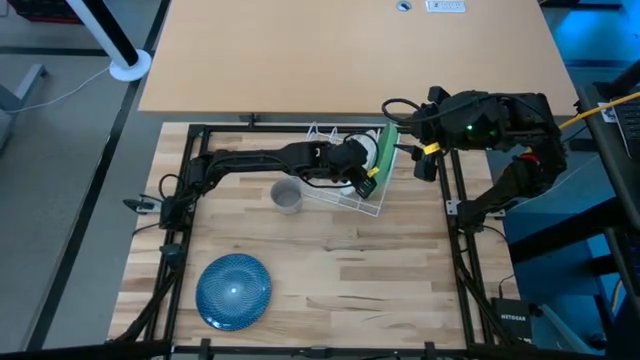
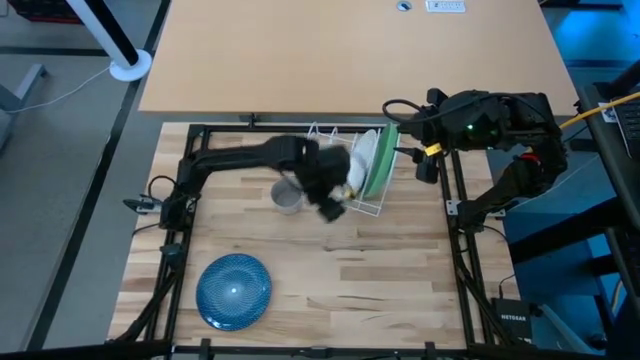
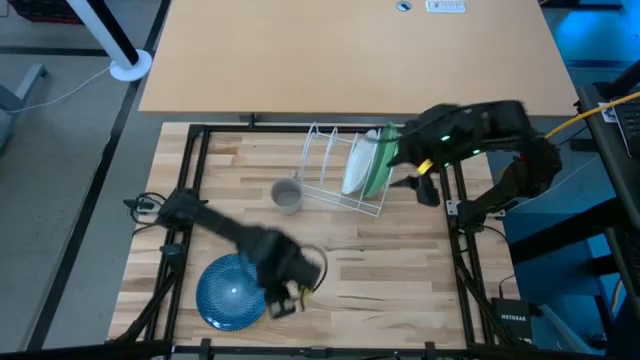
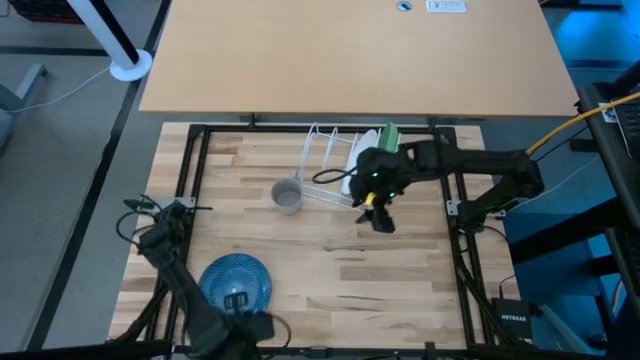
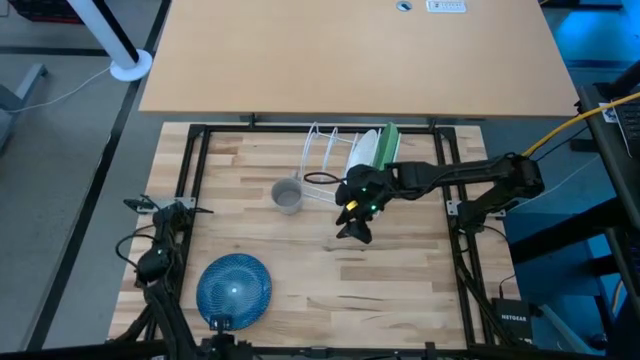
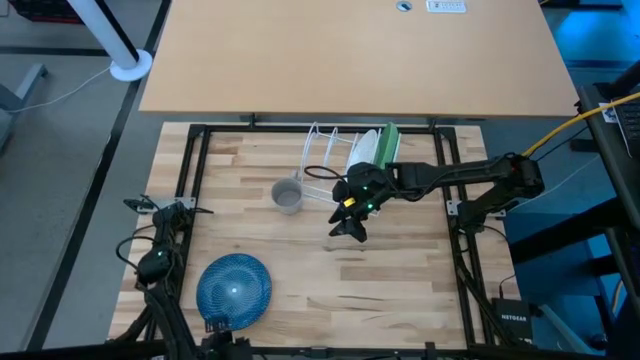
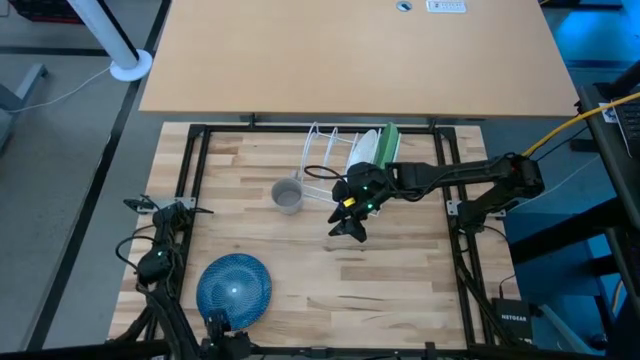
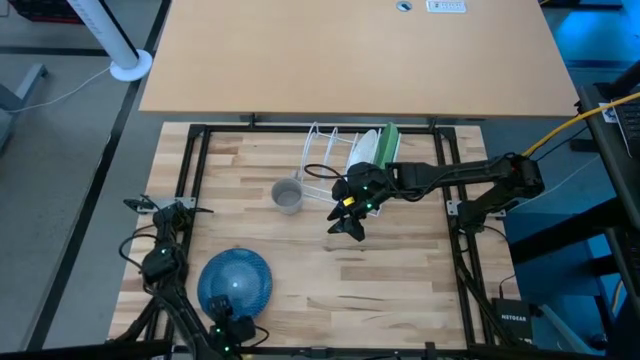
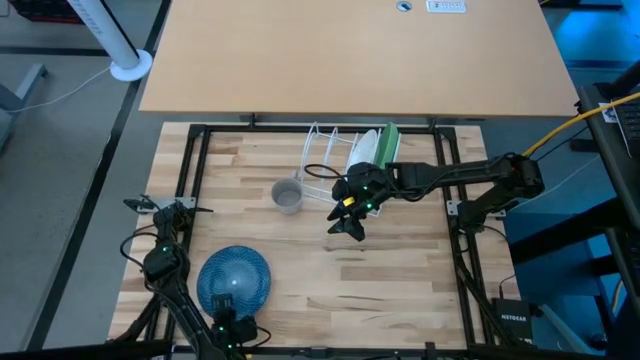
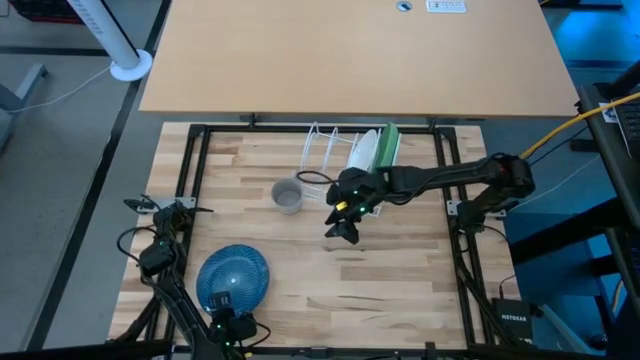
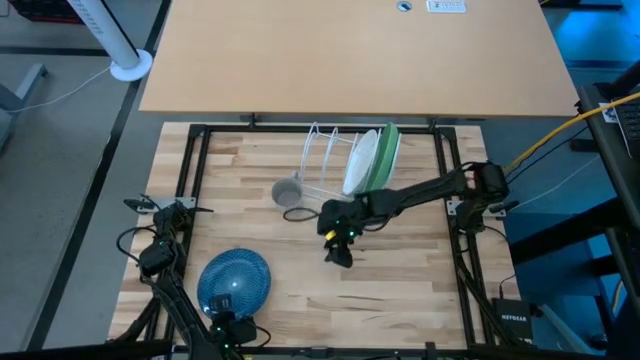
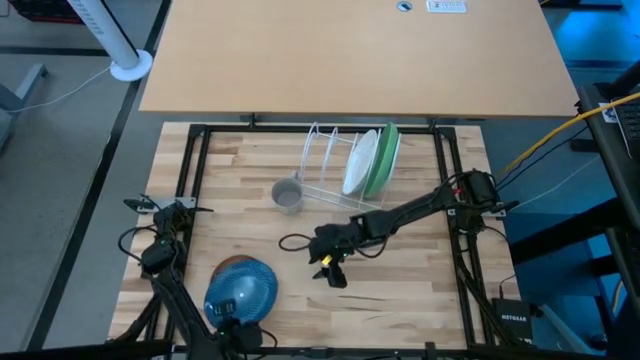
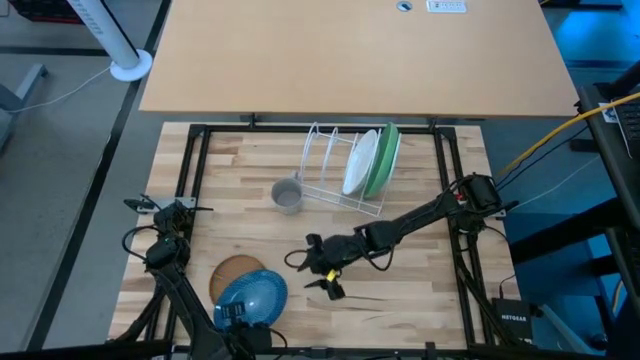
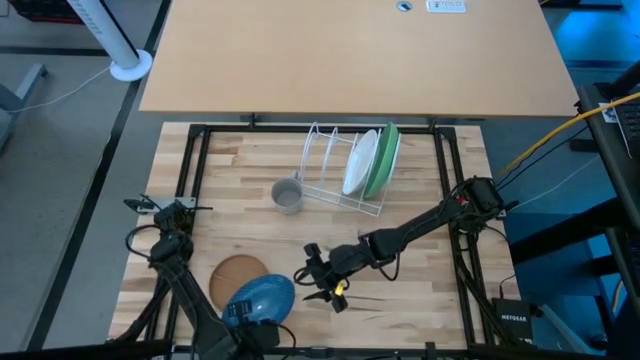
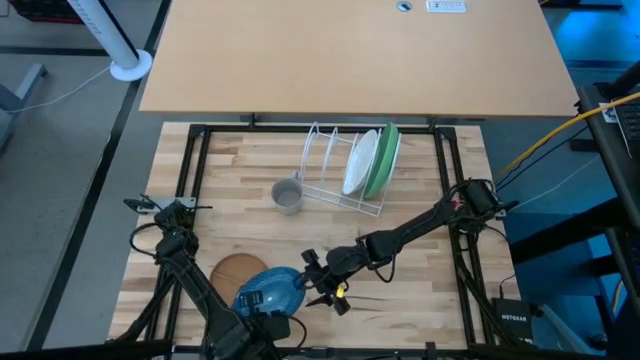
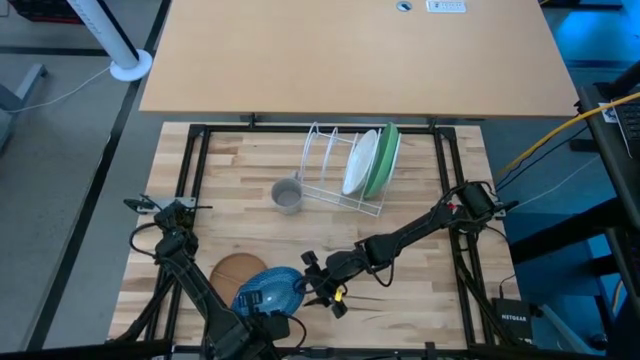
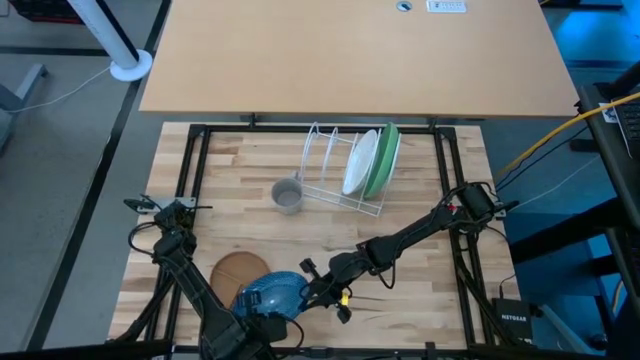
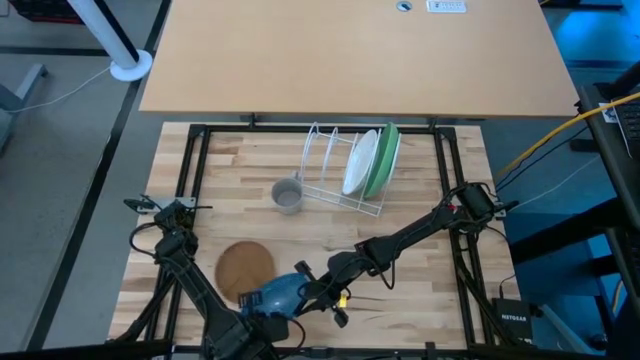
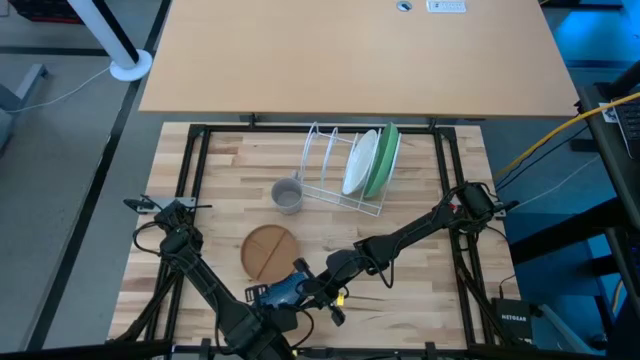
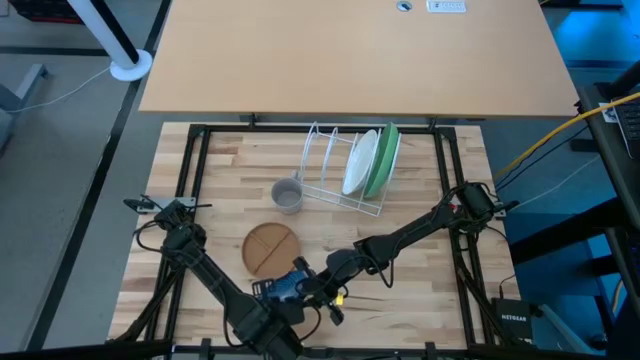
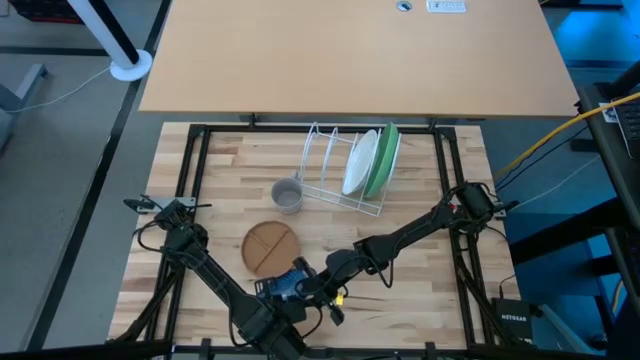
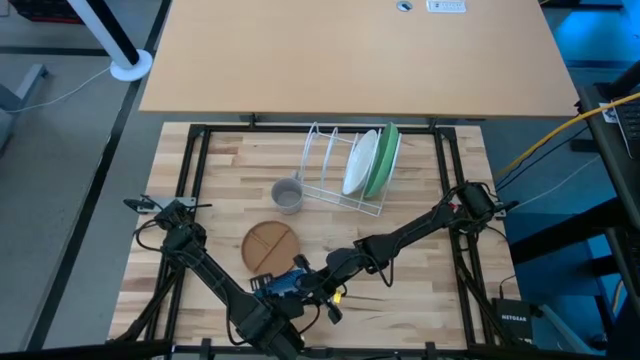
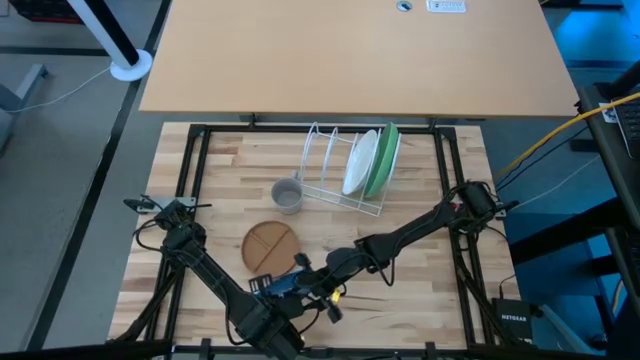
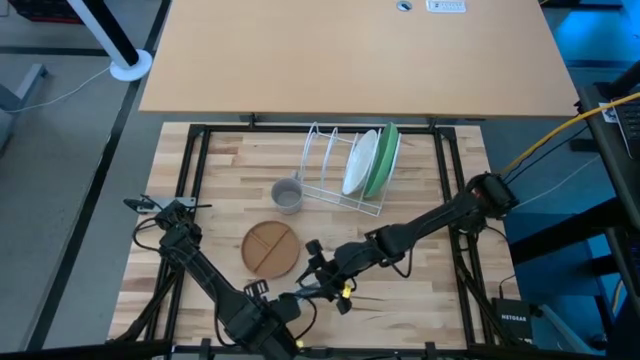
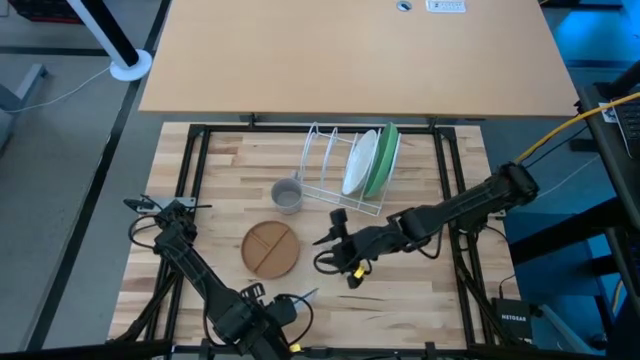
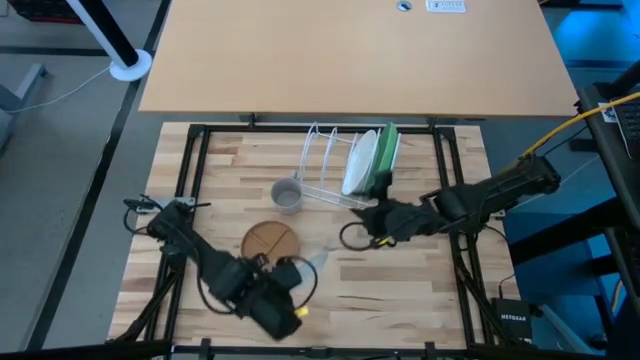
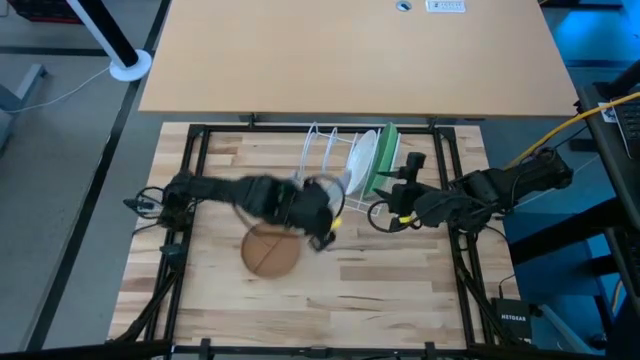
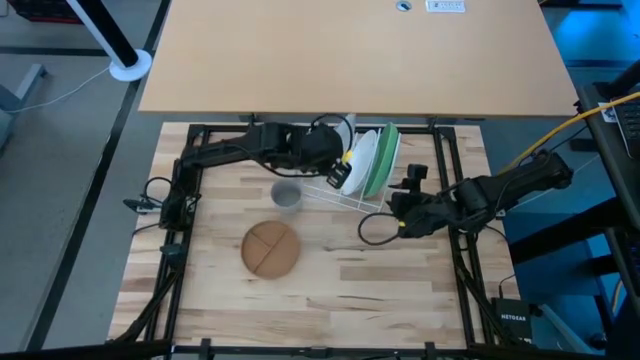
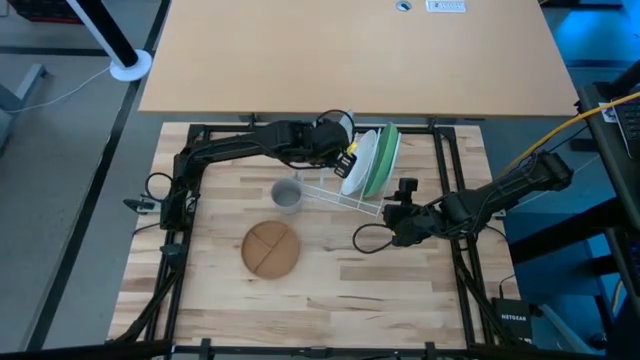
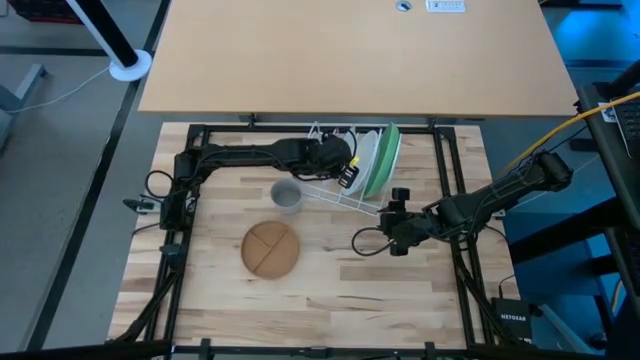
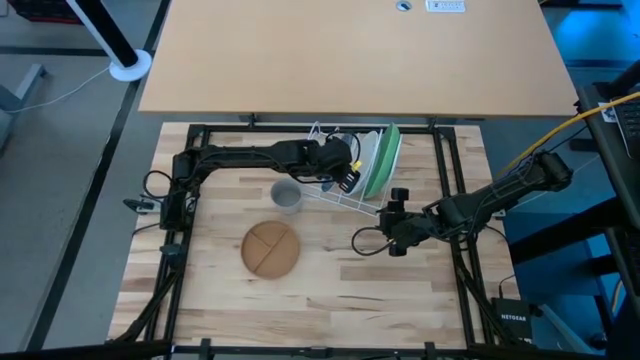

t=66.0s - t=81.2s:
Task: Sort dishes
Put the blue plate in the dish rack

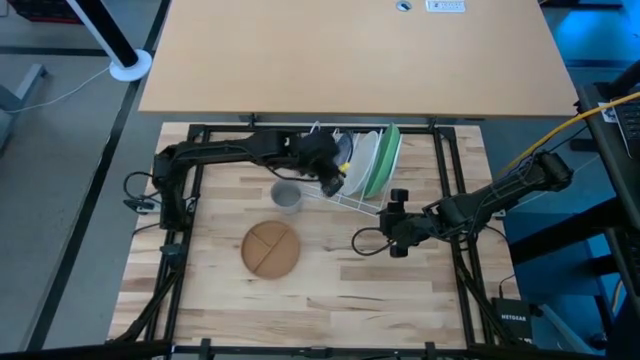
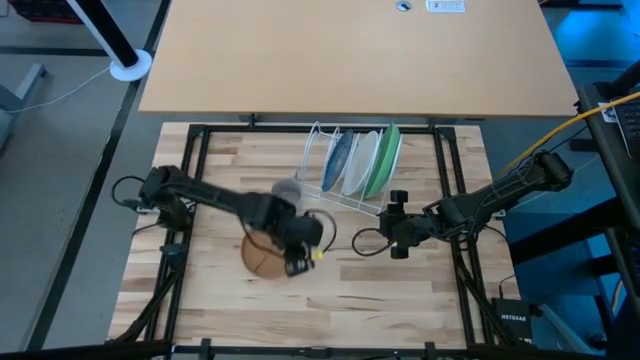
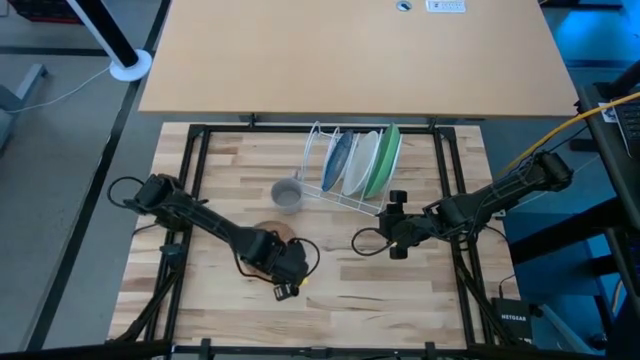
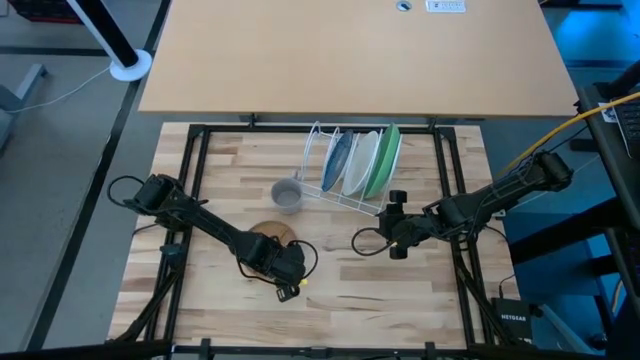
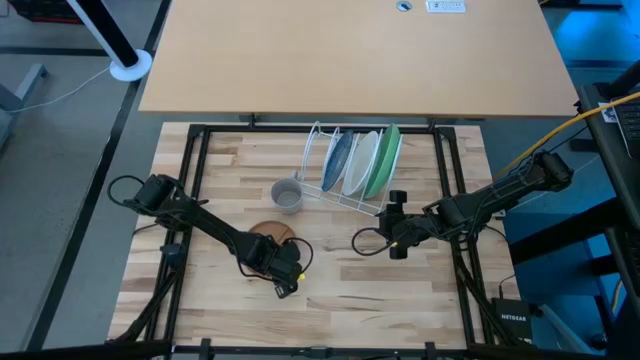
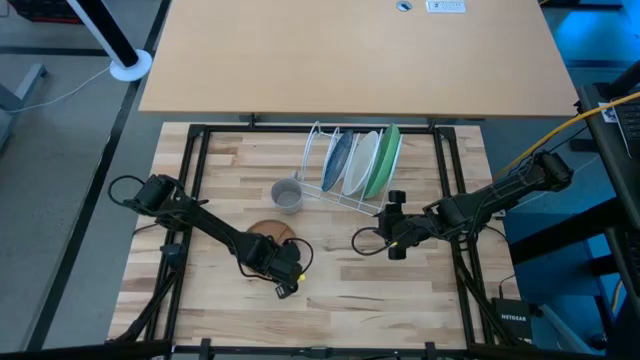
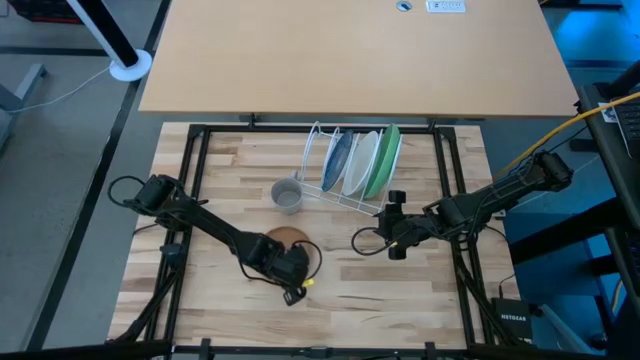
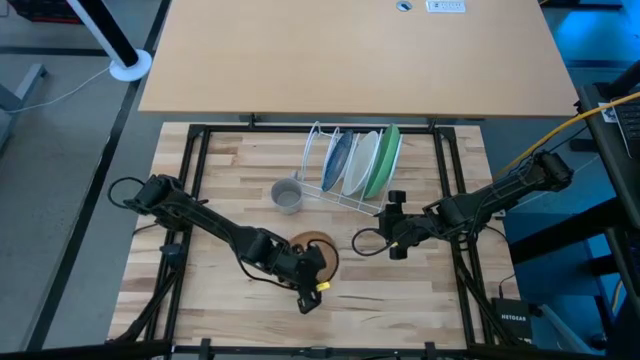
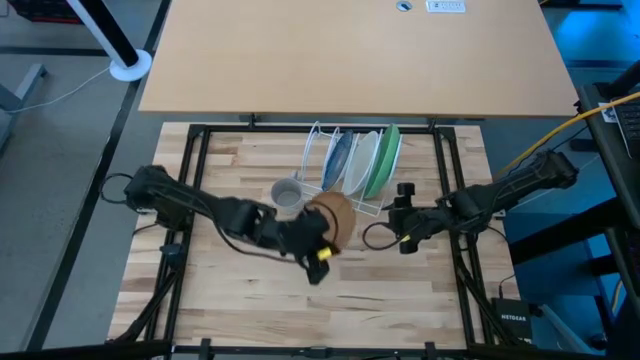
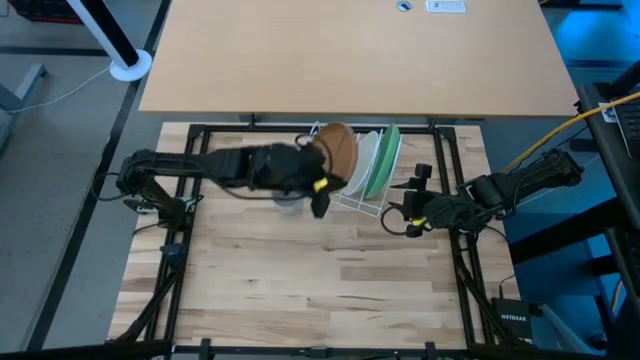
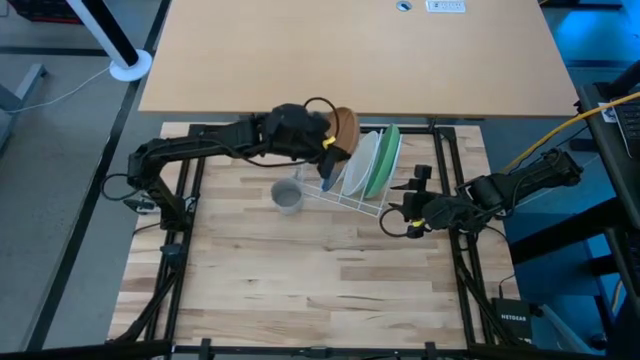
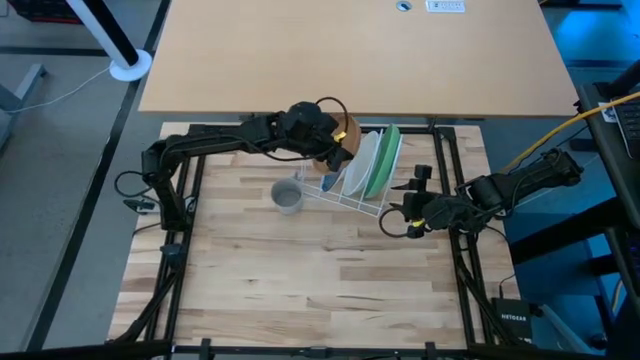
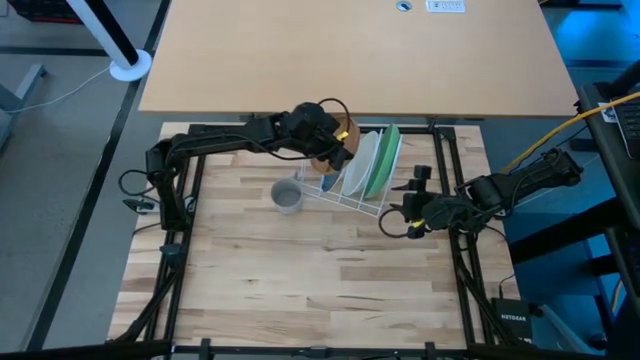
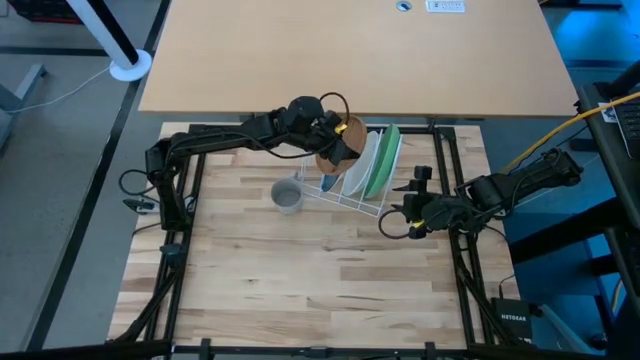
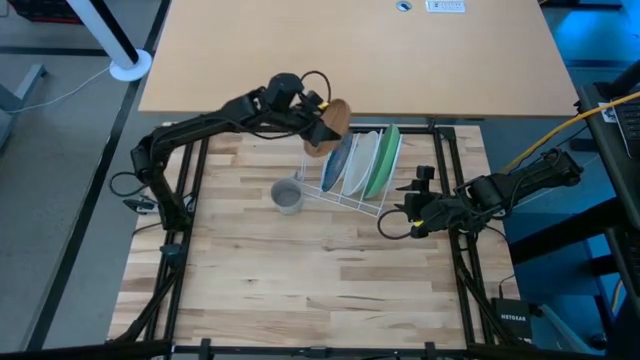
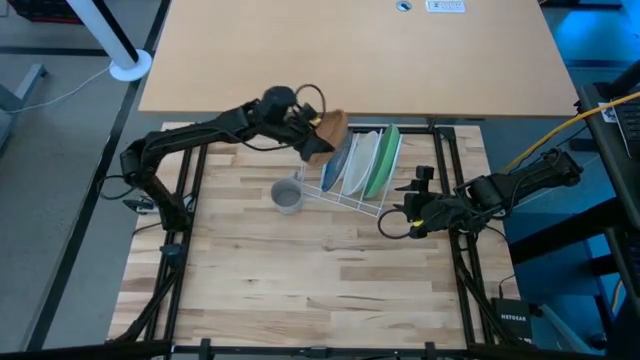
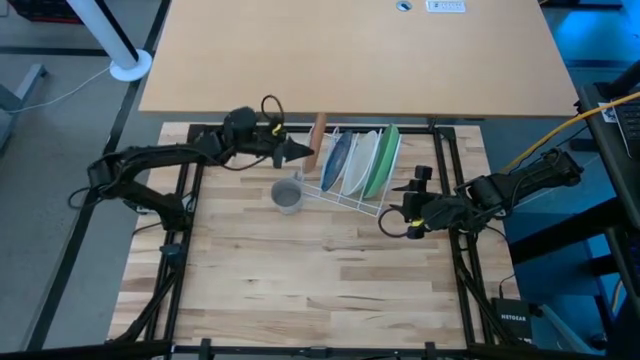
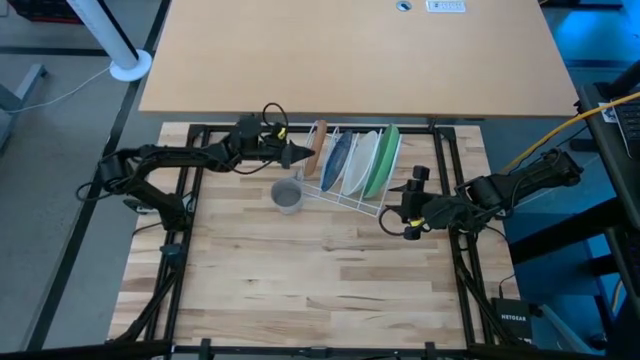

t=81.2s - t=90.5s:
Put the brown plate in the dish rack
